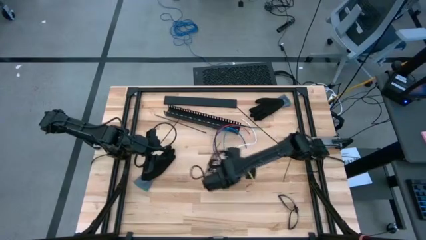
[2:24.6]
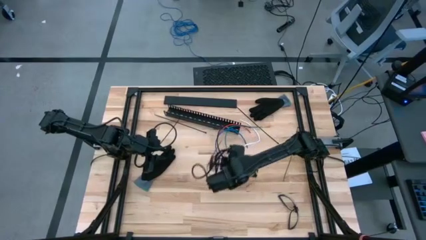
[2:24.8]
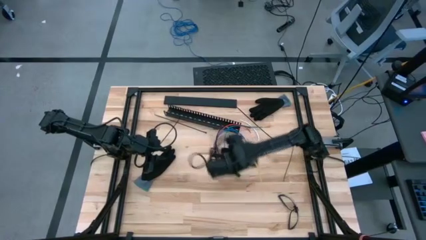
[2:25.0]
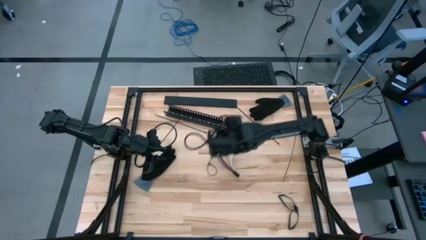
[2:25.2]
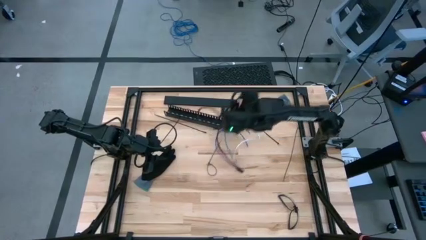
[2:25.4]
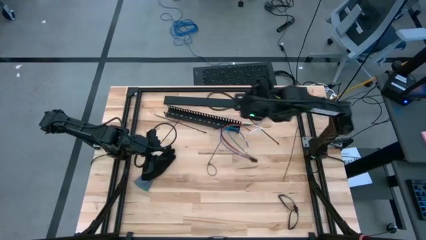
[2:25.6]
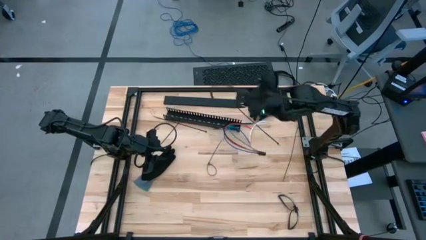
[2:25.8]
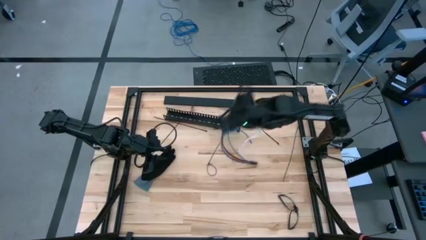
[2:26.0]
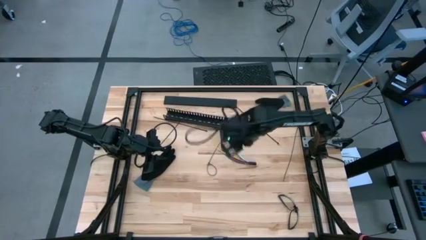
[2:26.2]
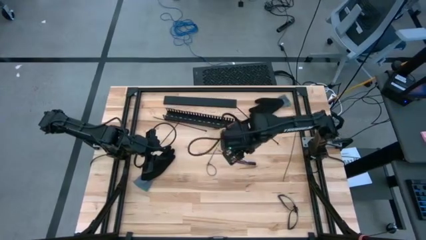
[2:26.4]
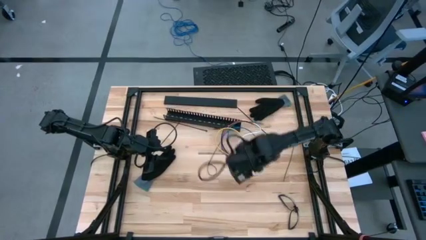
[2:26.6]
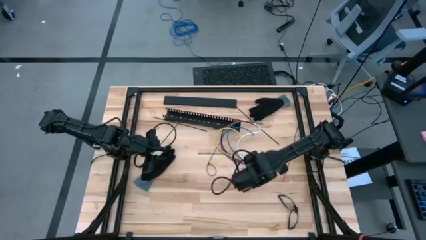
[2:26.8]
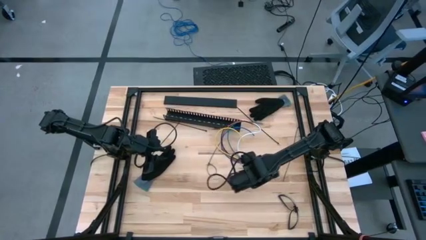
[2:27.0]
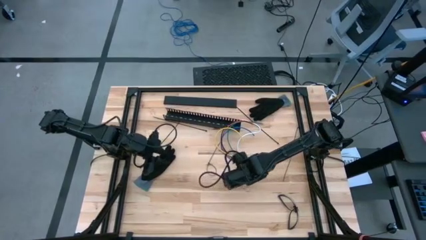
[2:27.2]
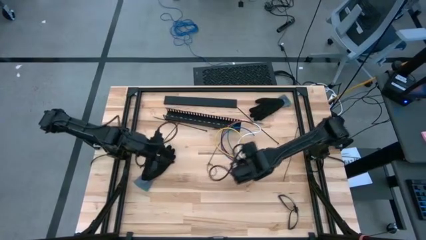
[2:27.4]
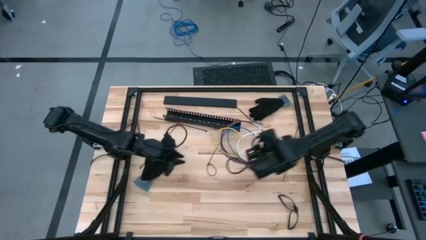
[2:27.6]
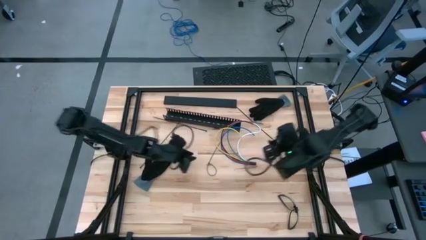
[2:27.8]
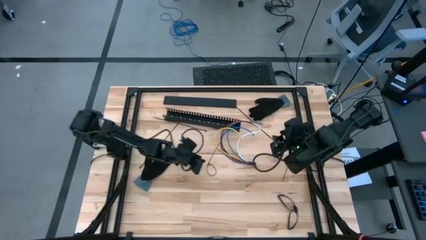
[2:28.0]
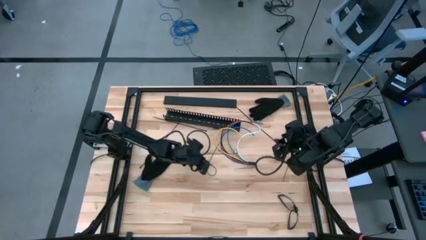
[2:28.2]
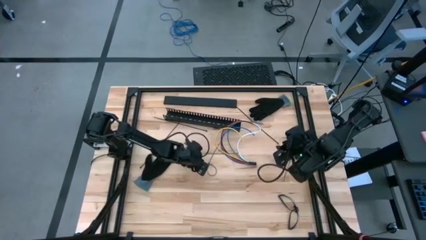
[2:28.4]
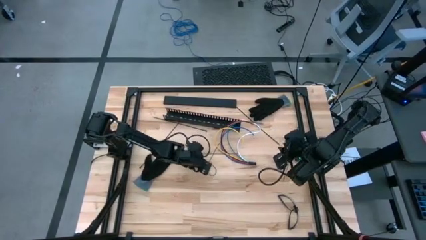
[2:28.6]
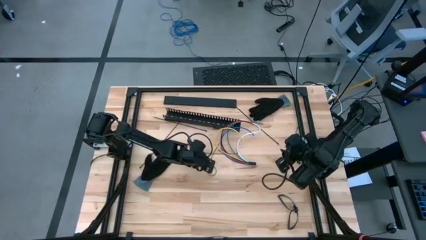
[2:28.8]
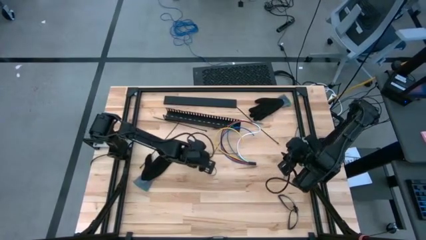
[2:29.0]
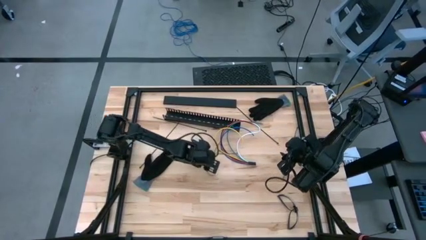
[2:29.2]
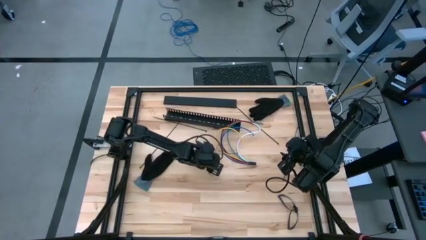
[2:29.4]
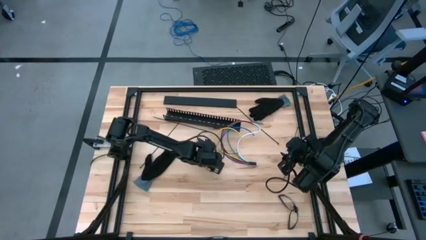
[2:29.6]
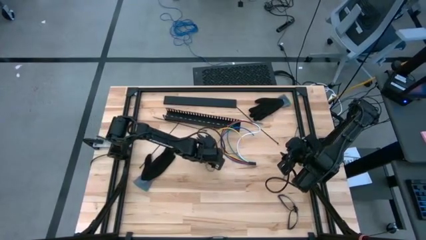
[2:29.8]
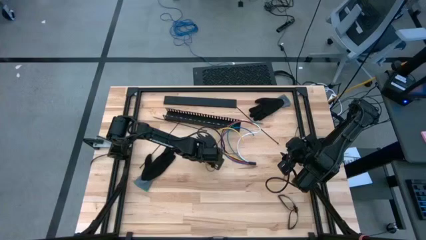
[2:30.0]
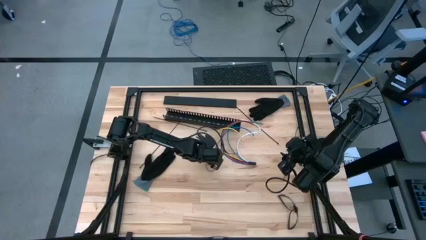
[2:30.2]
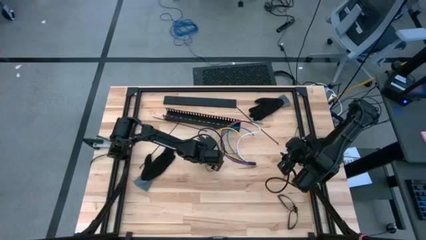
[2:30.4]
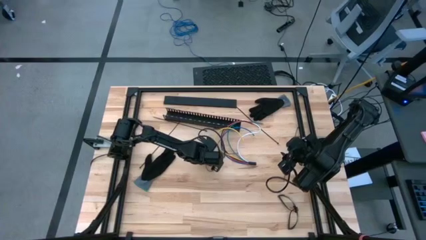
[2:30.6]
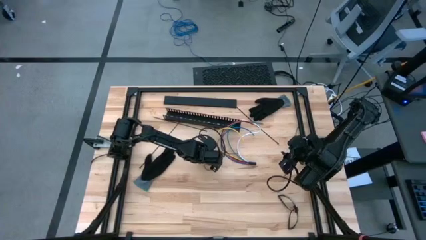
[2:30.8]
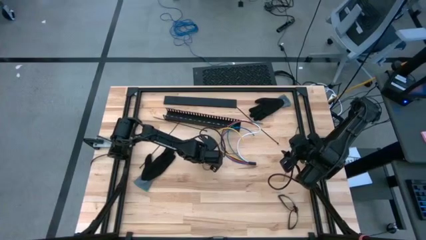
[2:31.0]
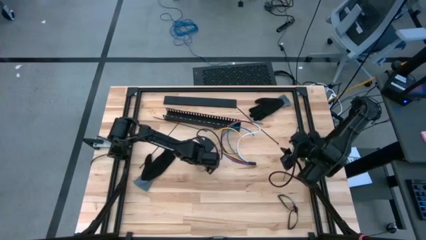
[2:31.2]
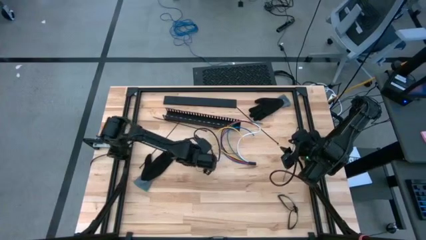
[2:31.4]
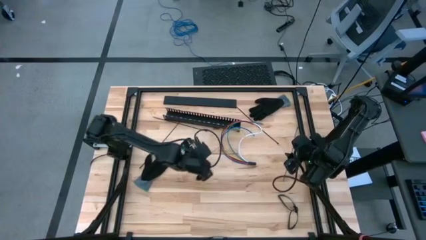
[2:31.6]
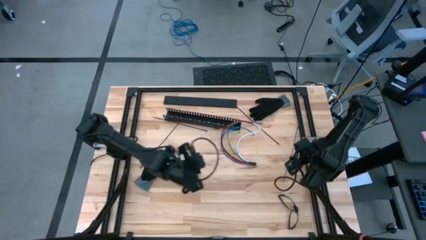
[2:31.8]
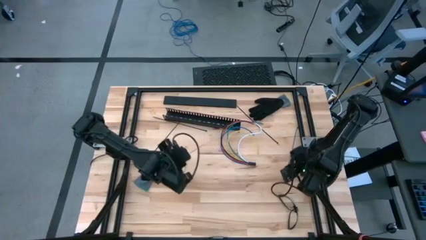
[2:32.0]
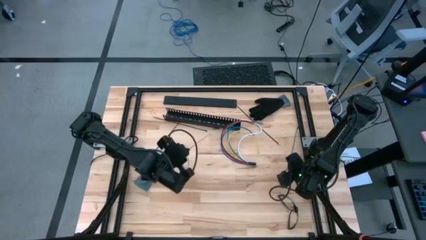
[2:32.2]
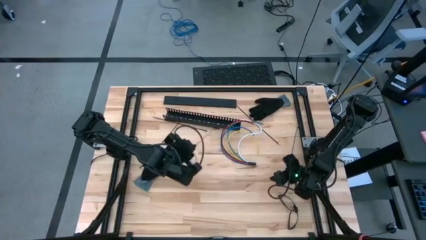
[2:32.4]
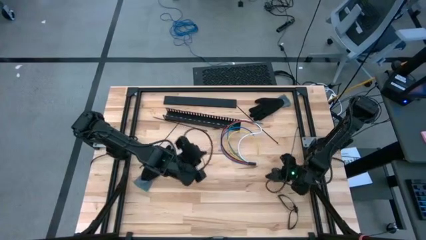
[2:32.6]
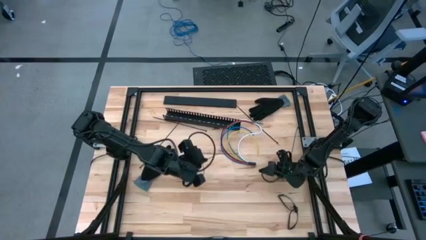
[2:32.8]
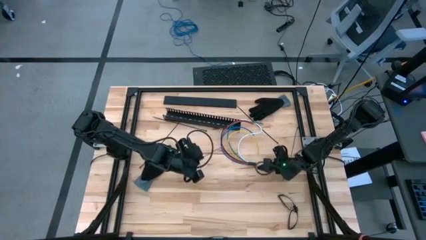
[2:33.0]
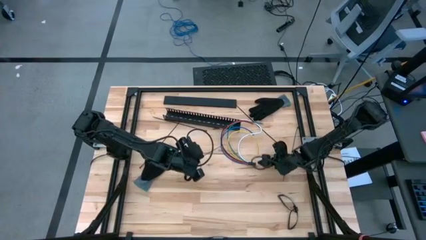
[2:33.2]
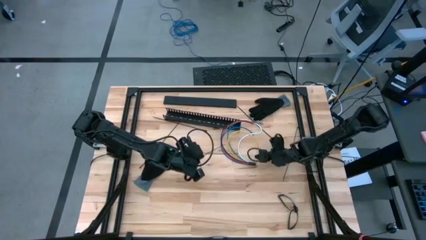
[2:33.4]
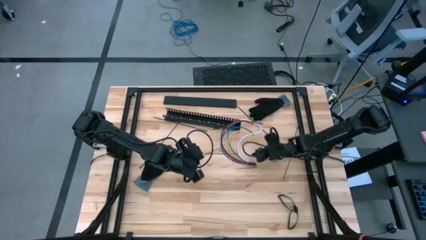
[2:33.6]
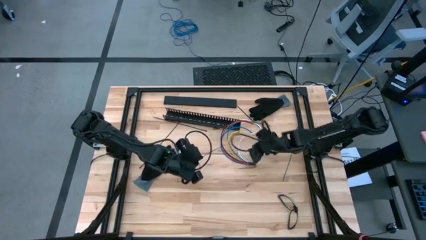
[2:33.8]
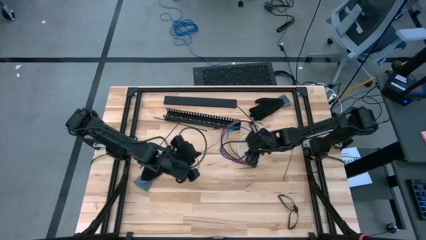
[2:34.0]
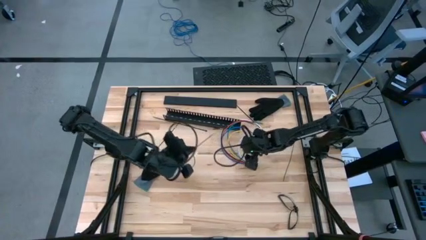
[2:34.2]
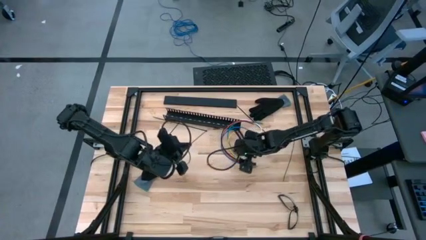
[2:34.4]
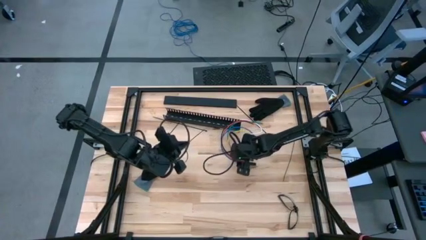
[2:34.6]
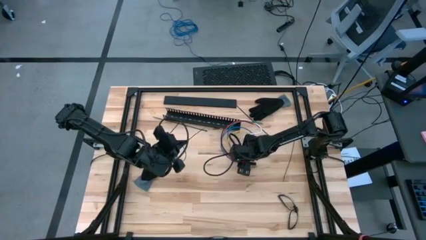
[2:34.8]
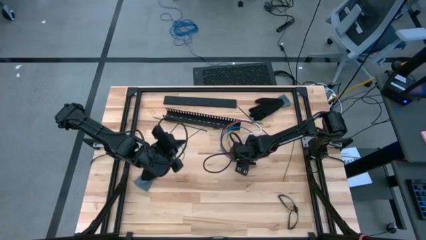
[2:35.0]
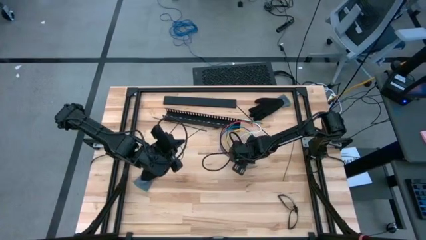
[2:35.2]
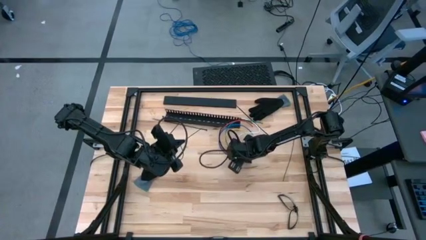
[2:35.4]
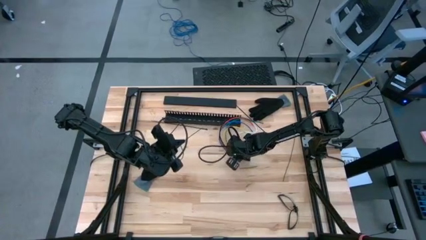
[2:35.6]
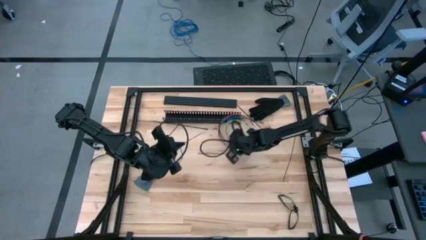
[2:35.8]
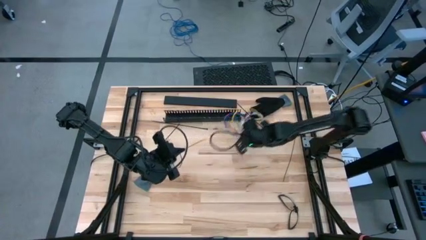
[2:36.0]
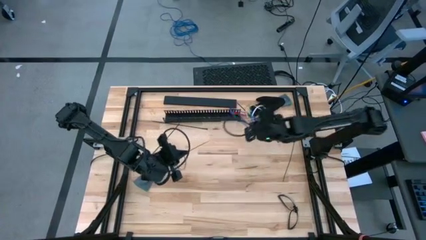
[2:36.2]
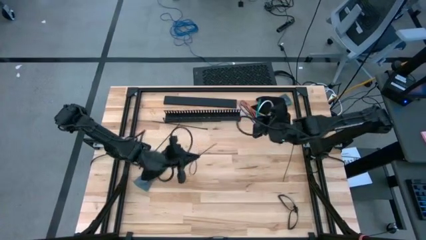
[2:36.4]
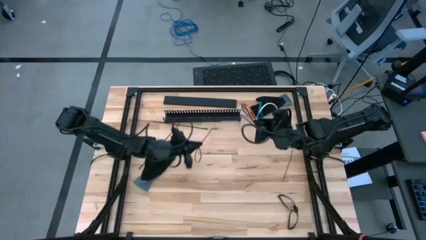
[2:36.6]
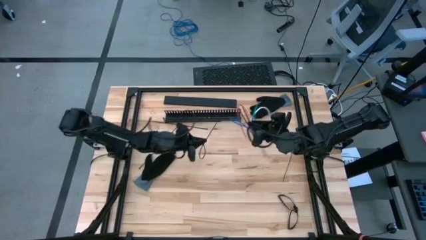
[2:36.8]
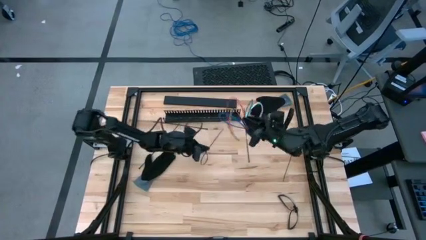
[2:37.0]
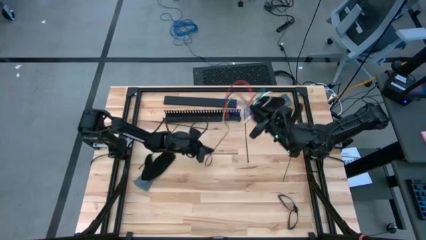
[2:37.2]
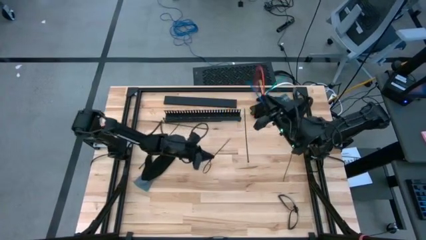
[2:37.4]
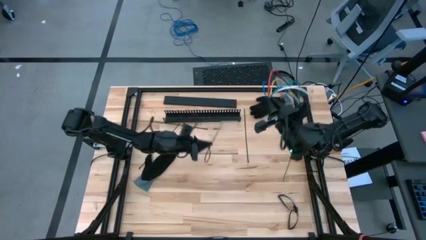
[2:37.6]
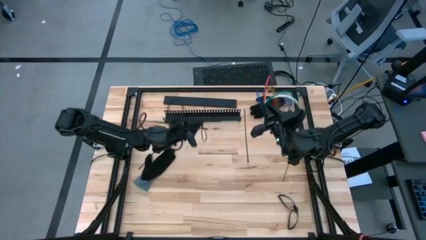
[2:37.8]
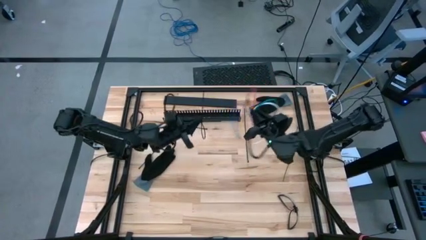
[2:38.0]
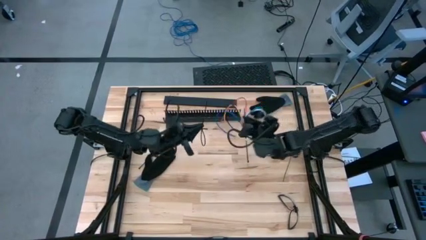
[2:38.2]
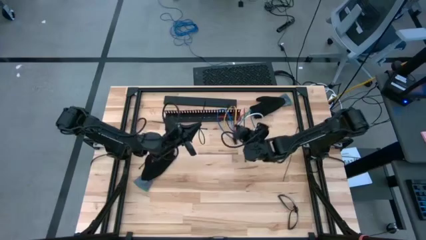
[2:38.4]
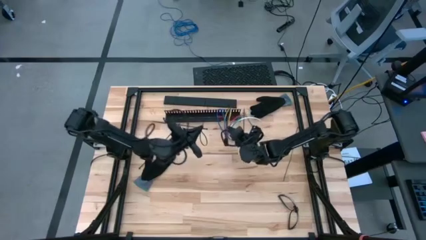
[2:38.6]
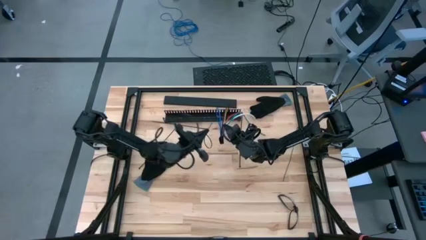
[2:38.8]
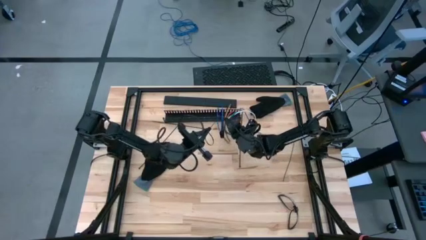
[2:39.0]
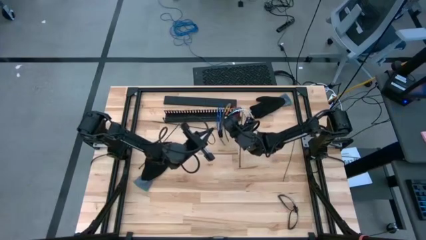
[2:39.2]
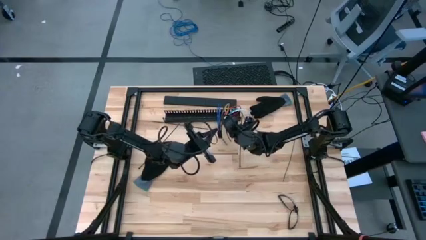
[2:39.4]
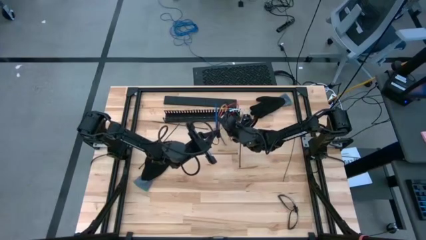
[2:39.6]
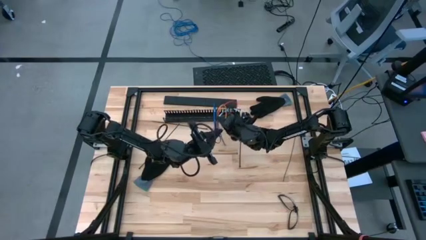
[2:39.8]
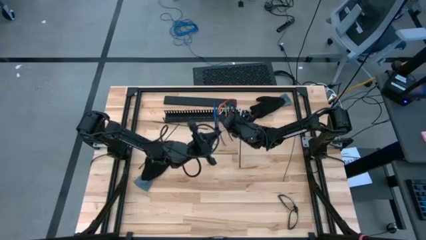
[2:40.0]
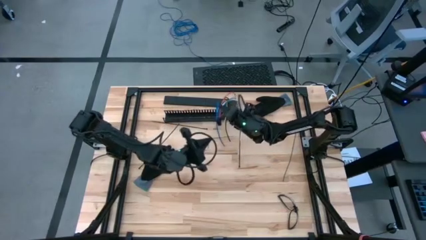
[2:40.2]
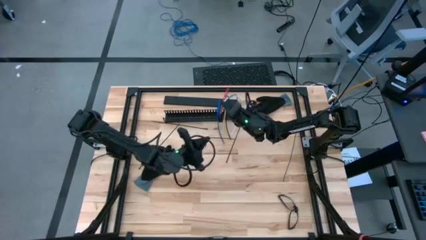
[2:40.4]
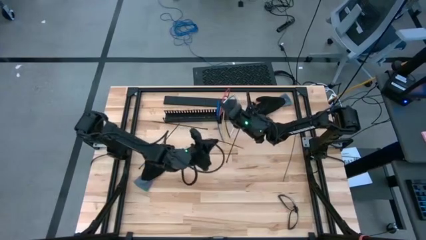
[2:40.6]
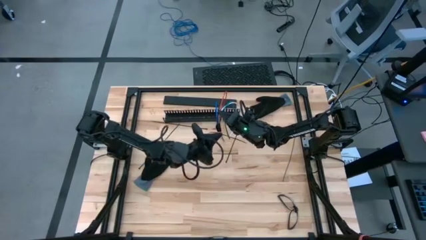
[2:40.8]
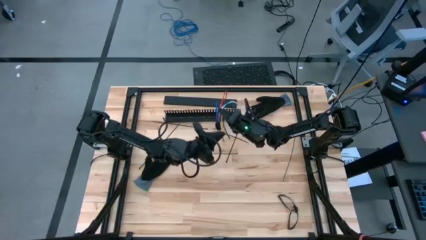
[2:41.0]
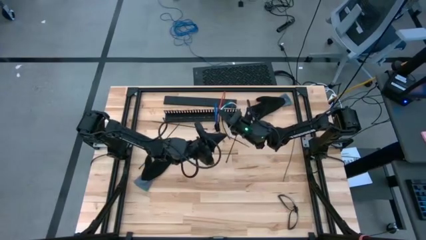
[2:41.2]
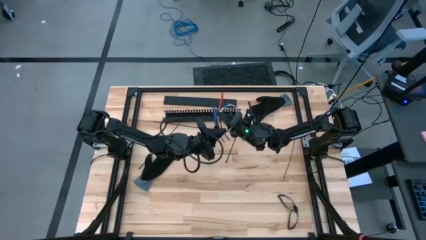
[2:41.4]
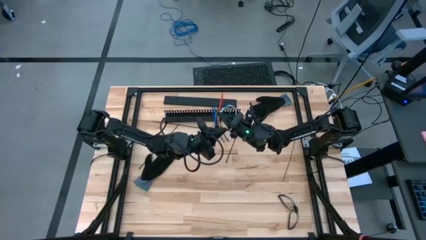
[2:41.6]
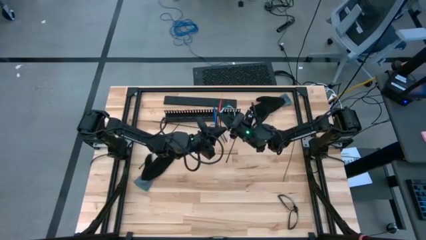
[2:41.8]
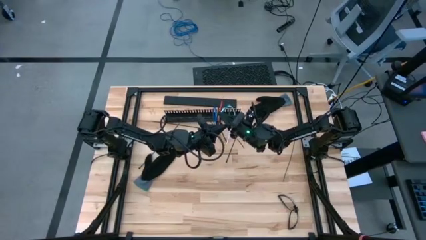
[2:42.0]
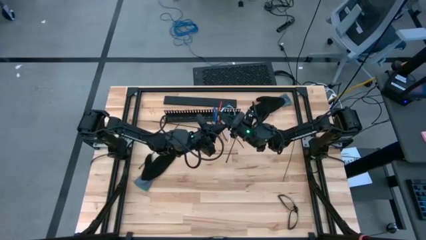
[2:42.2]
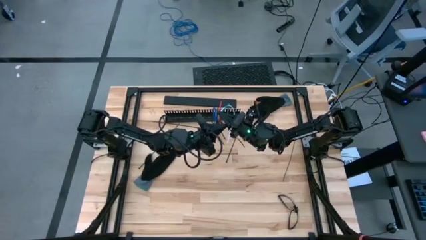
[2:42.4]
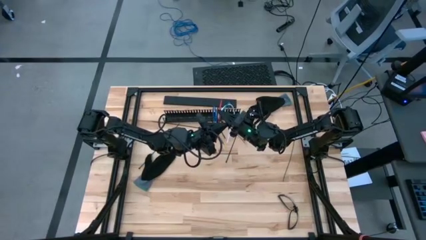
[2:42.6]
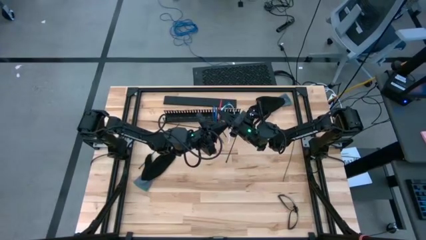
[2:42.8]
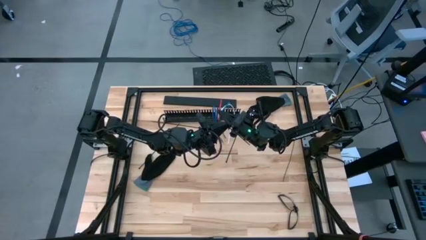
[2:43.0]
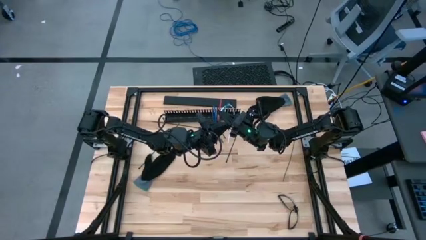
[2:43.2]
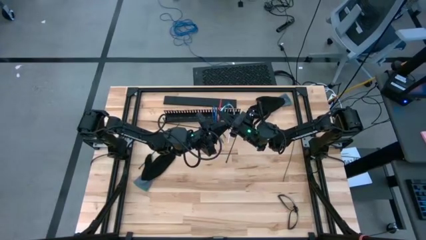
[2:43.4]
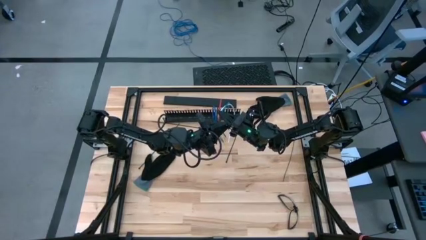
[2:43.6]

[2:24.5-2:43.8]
Task: Ziptie cables
Wrap the cable wires using a zip tie
